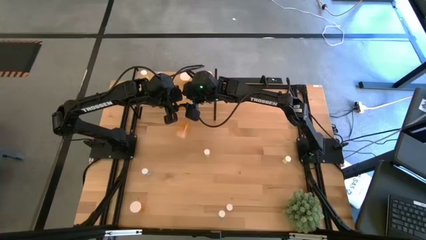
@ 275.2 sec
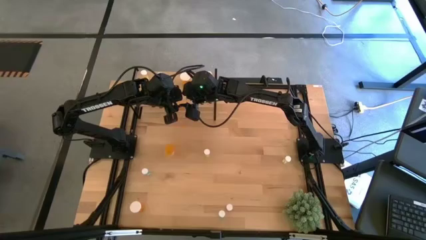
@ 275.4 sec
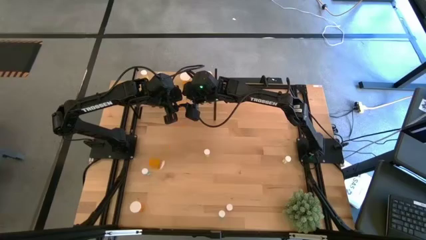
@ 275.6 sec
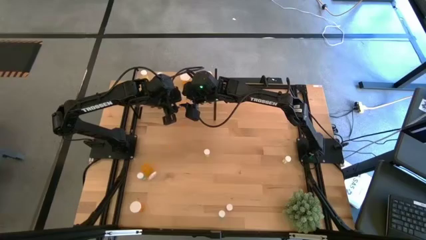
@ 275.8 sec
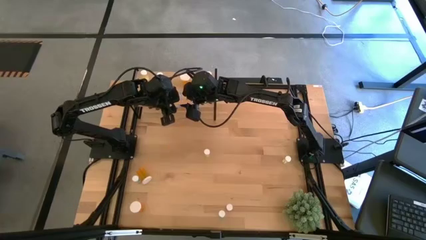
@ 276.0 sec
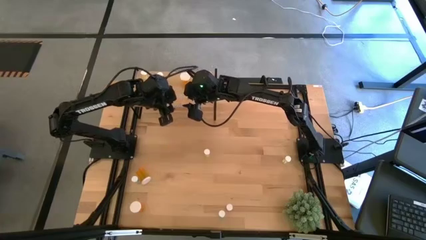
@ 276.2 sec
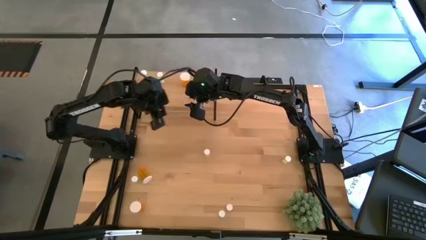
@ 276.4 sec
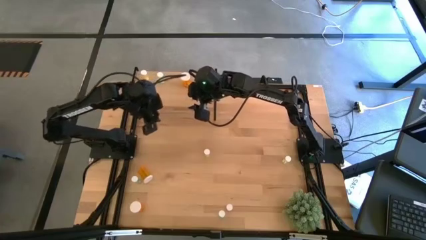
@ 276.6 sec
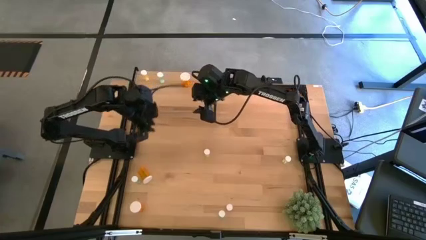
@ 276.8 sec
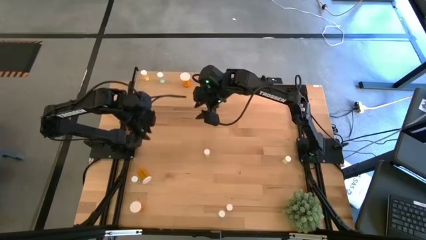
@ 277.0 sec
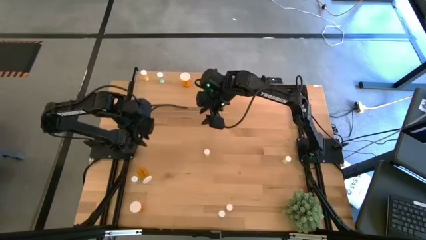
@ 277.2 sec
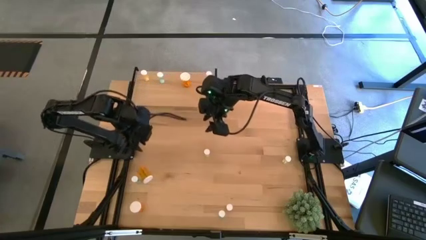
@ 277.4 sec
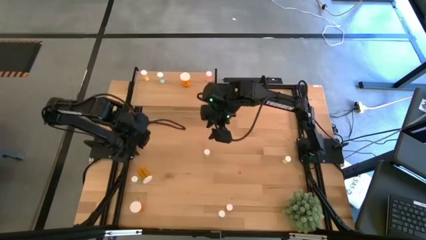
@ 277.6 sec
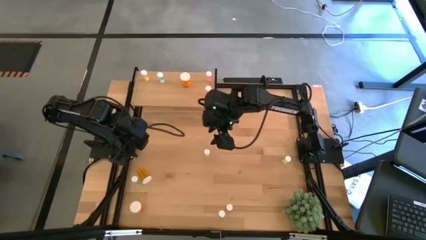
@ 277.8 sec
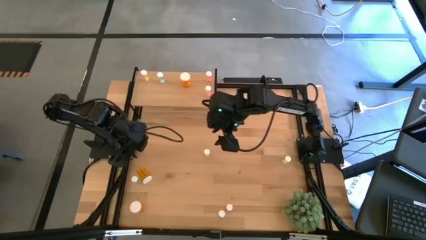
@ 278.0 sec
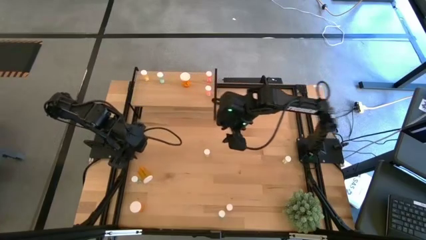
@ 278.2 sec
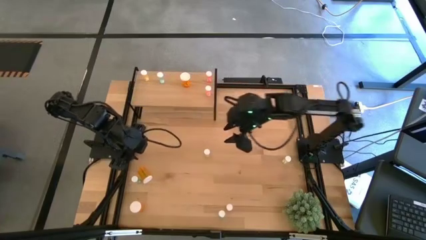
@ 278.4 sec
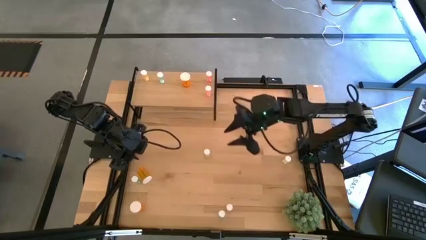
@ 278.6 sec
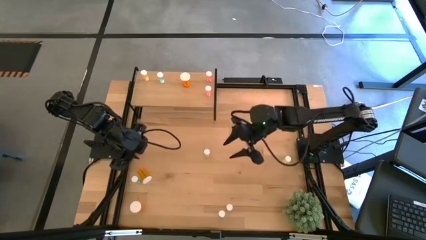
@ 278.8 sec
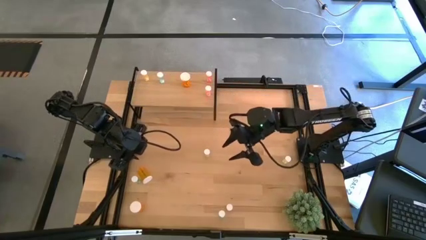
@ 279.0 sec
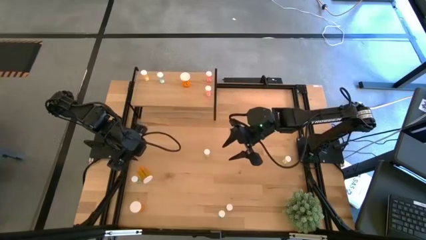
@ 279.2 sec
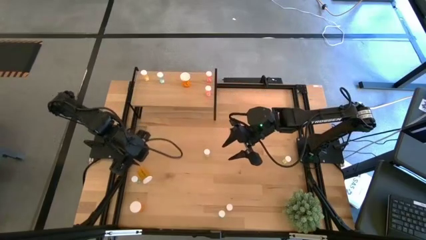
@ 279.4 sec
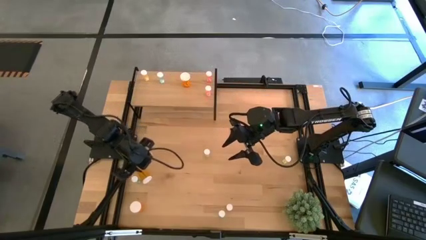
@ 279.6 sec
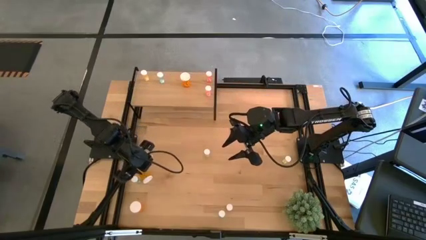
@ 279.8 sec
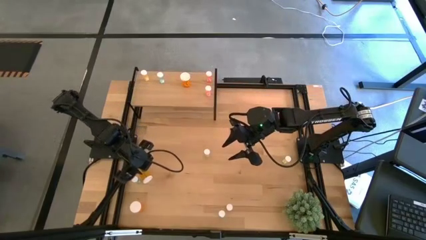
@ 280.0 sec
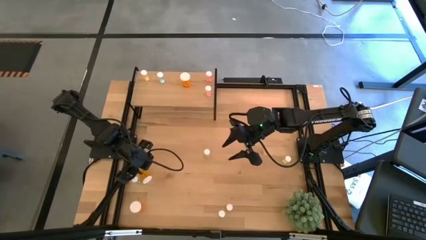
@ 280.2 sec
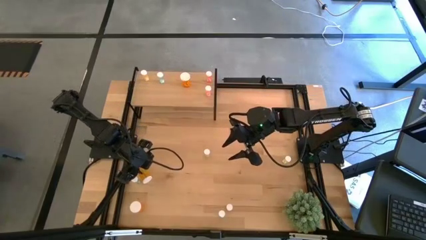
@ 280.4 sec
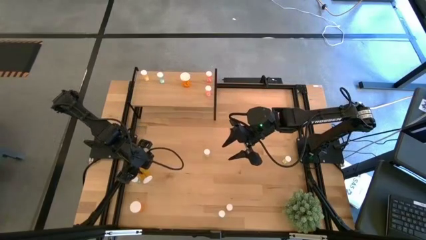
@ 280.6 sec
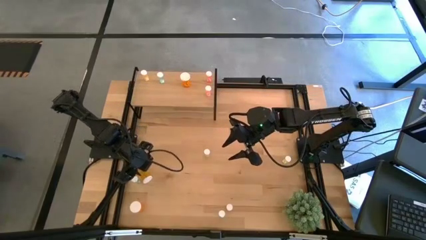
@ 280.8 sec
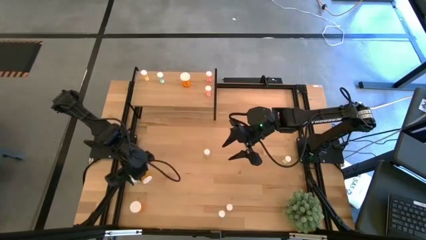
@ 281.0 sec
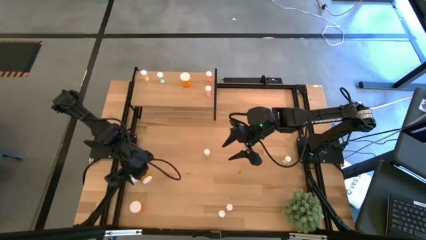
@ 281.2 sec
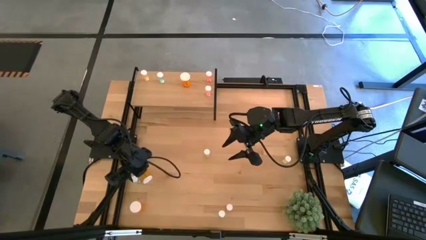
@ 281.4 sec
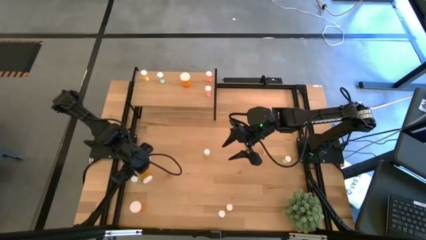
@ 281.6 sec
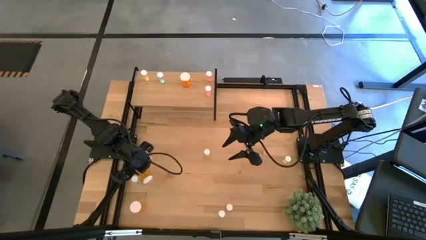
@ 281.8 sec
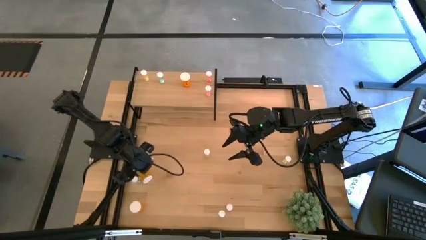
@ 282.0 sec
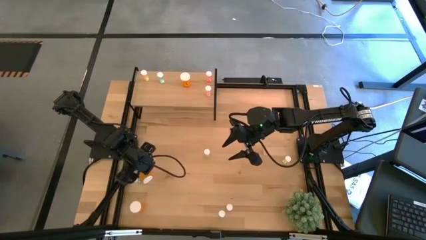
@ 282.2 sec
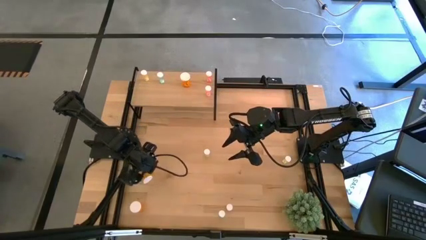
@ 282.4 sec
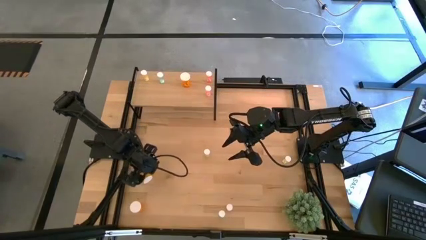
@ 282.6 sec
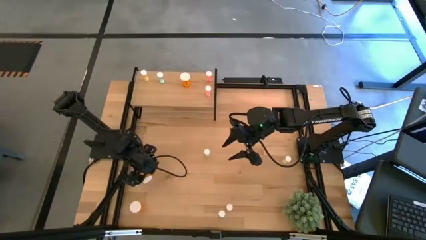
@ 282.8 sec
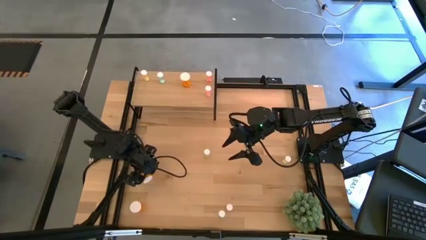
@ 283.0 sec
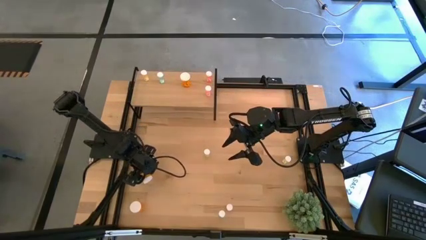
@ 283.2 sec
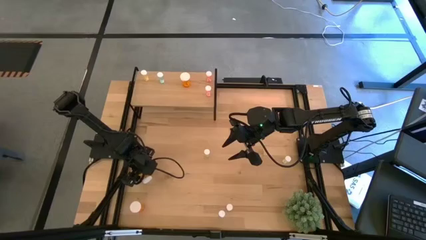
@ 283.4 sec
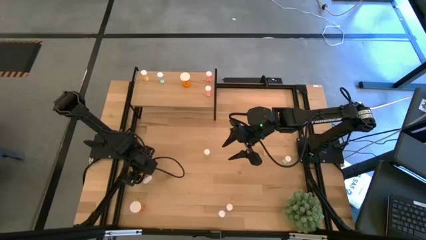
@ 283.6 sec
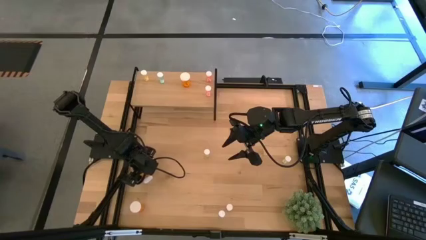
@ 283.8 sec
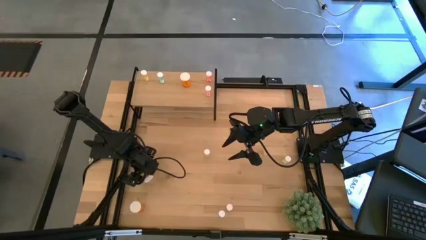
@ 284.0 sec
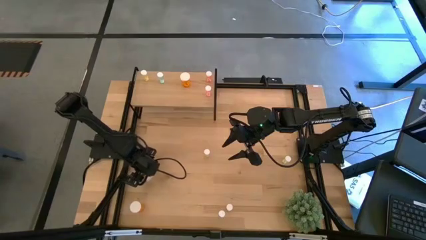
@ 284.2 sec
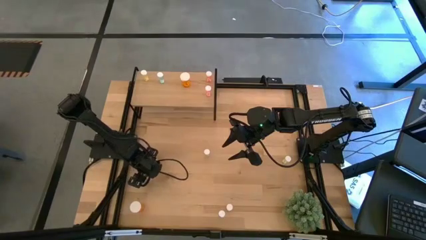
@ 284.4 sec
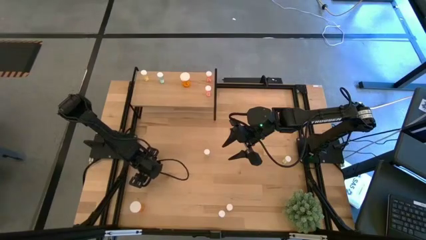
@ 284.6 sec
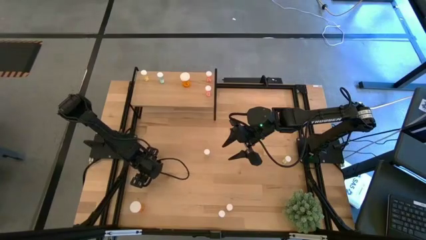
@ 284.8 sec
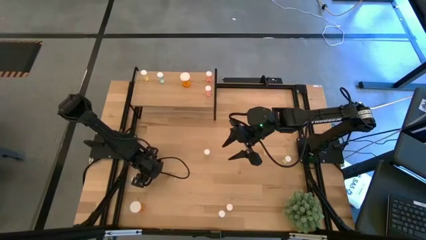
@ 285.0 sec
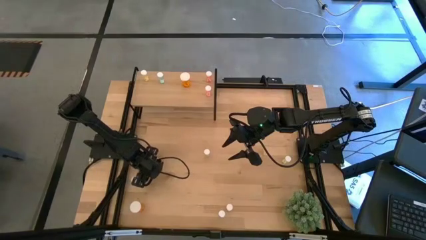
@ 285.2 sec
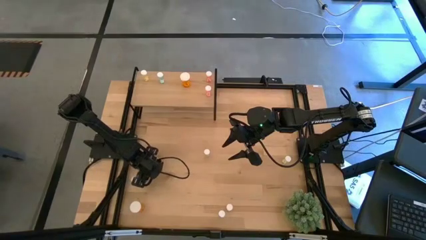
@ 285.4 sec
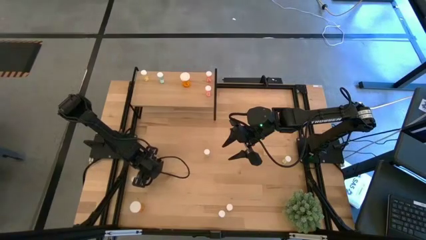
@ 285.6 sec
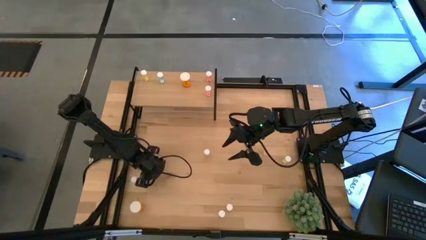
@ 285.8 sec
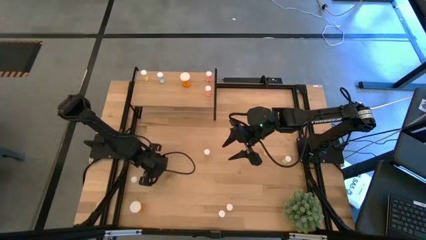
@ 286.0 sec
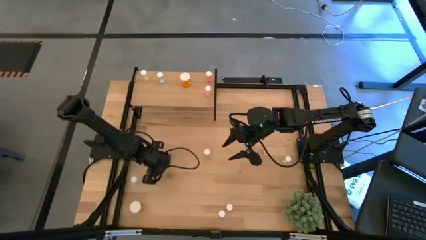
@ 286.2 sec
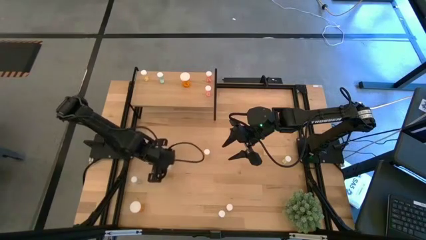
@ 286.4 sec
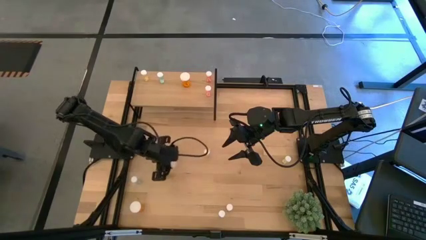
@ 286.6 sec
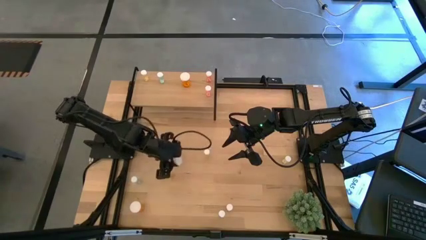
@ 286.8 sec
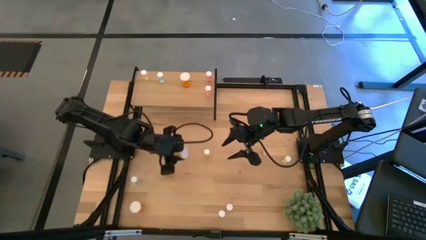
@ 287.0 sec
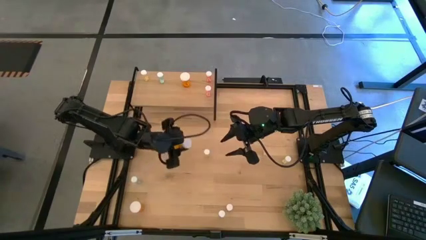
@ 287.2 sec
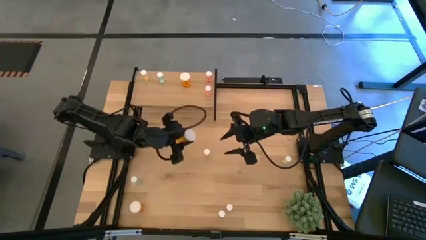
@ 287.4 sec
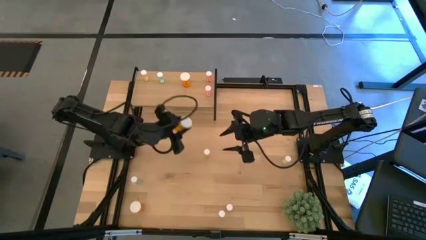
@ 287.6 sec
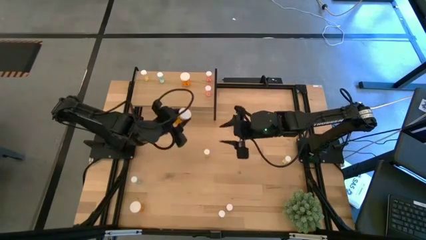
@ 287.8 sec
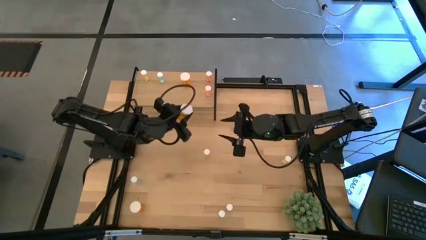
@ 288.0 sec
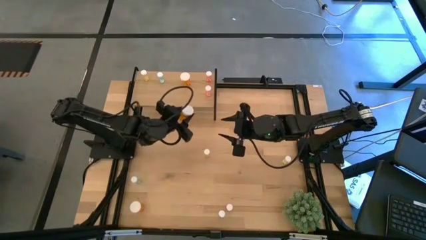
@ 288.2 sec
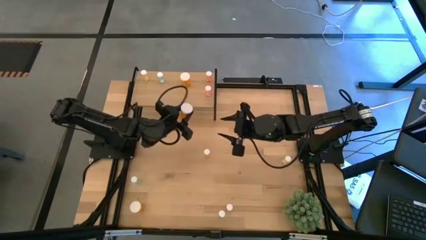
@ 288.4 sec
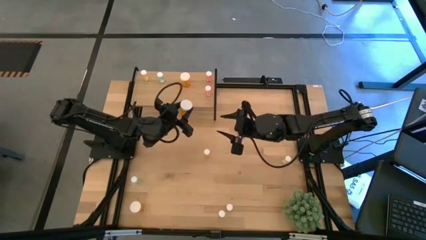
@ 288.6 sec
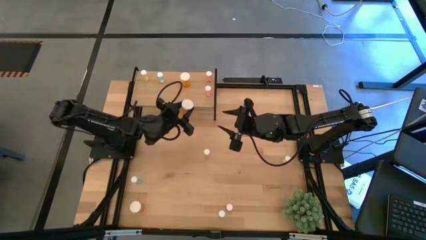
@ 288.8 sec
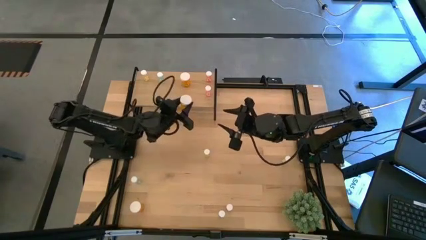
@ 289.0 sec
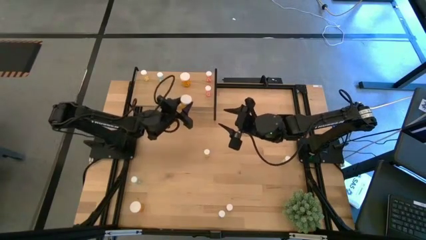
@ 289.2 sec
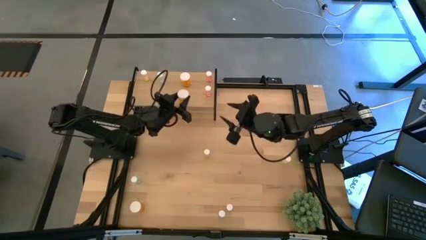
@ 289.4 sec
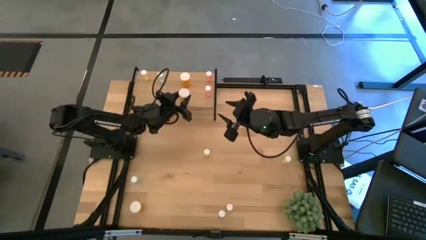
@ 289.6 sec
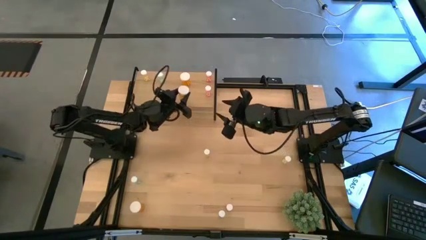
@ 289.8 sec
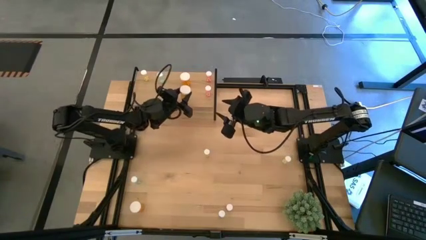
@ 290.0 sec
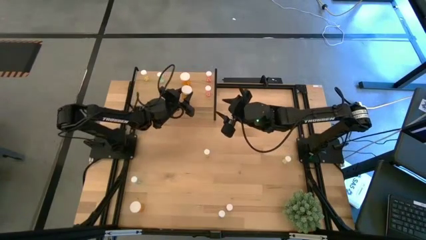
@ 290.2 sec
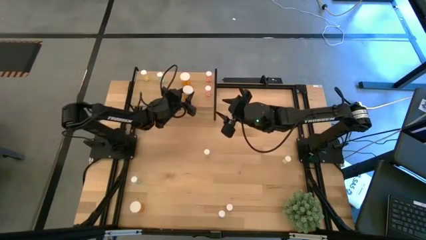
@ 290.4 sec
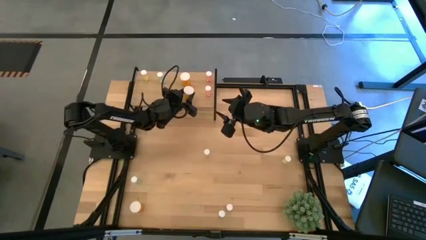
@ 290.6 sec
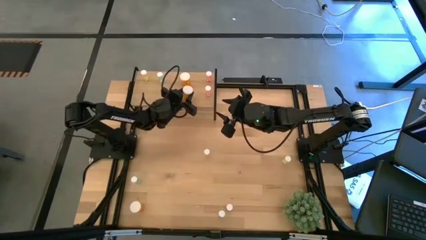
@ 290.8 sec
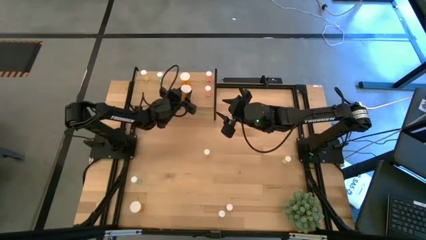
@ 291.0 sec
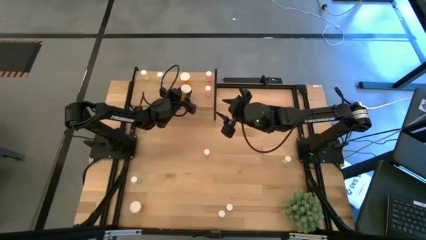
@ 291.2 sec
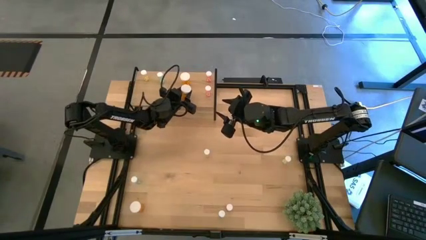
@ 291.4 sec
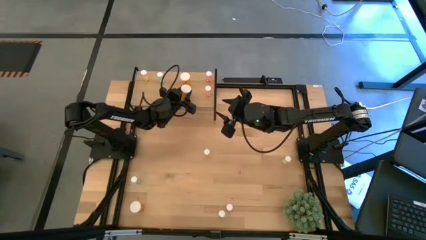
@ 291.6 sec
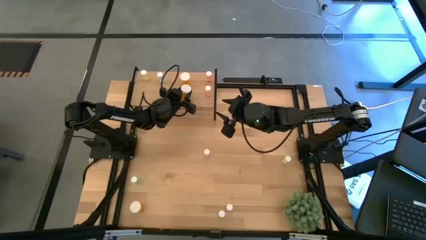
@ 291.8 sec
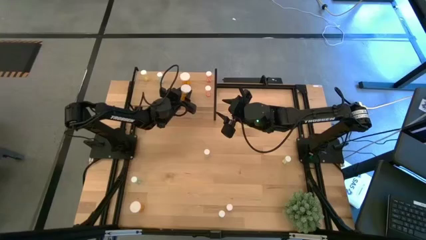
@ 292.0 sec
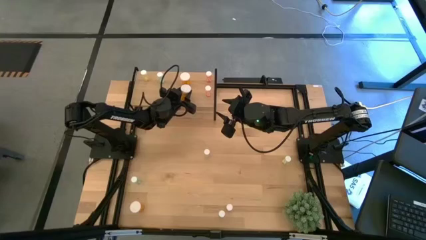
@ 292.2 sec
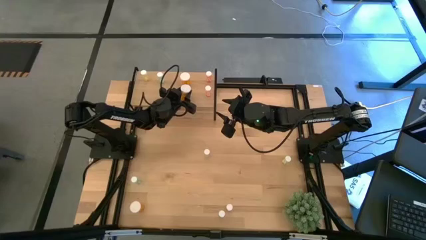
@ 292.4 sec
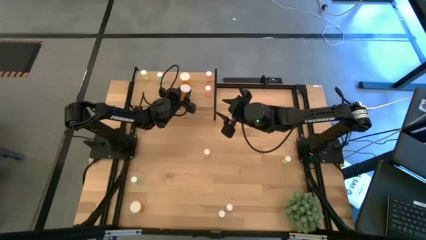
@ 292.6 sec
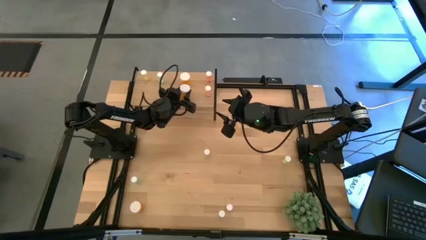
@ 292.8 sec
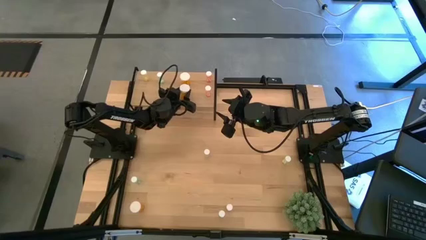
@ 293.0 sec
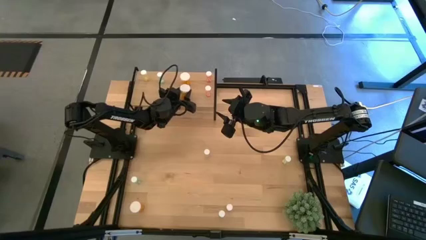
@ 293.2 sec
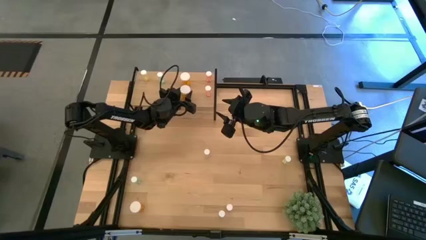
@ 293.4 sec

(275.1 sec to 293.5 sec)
Task: Pick and place medicine bottles onto shelf by color
Put the top big orange pill bottle on the shelf aligned with the orange pill bottle on the shelf
